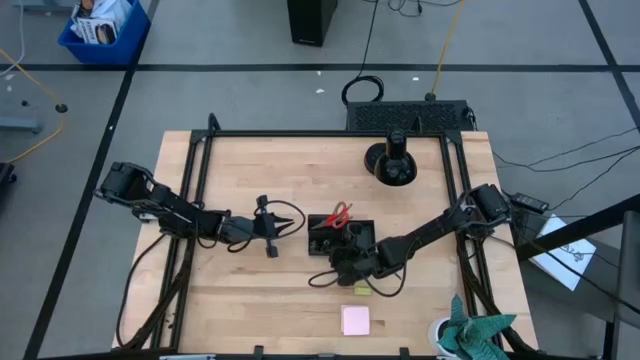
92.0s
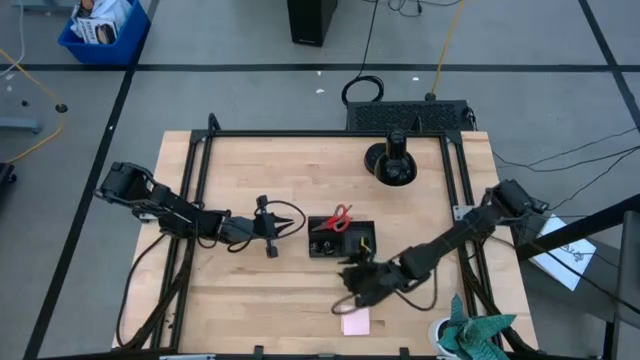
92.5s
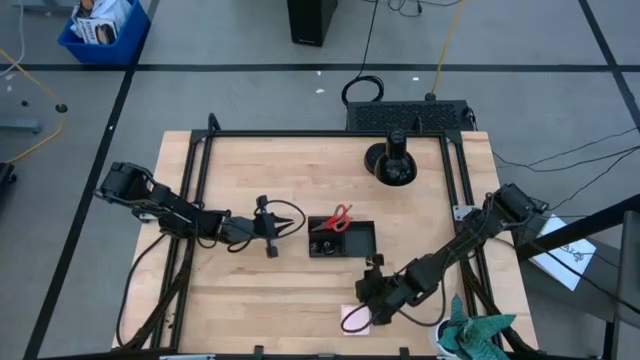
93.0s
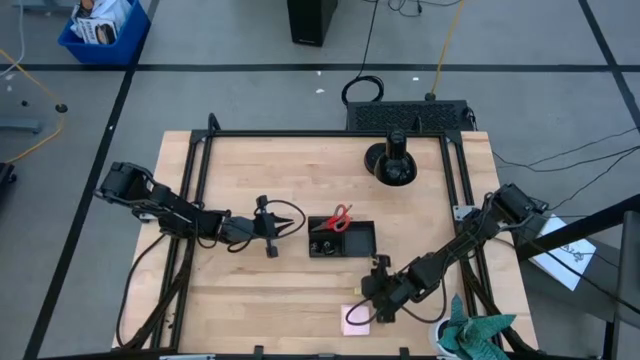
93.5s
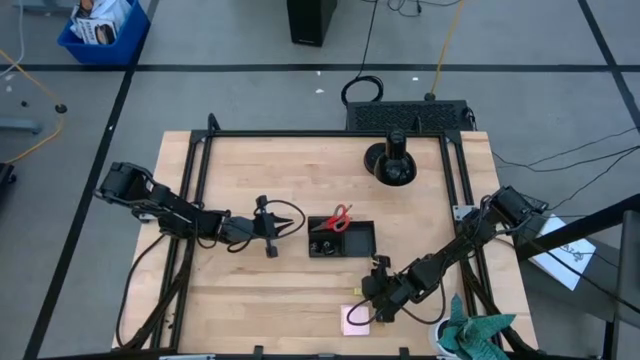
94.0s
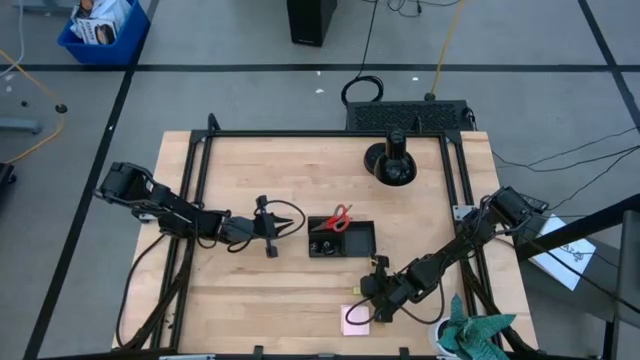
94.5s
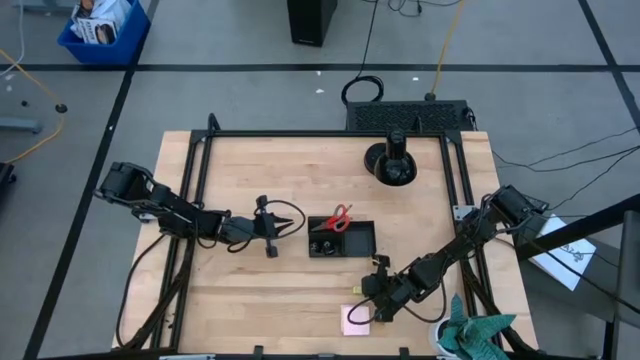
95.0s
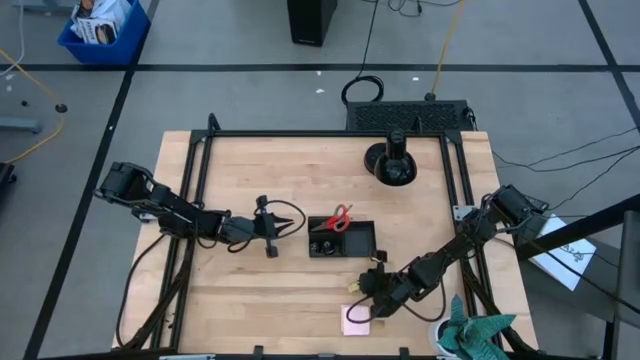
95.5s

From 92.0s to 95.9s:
Task: Pick and place office supplies into organizer
Put the yellow eraser into the black desk organizer

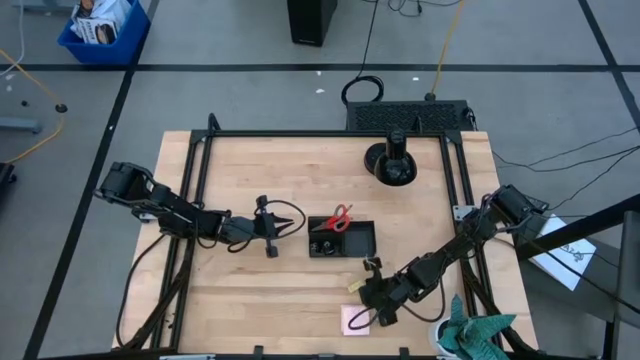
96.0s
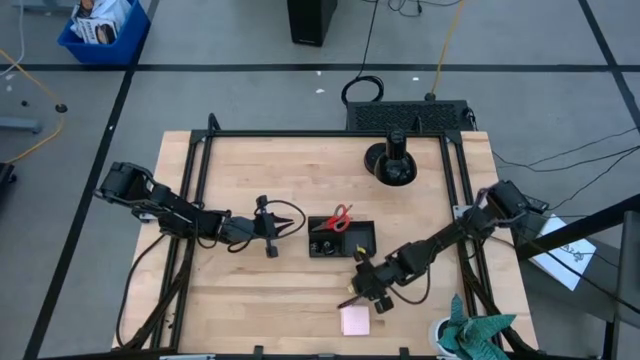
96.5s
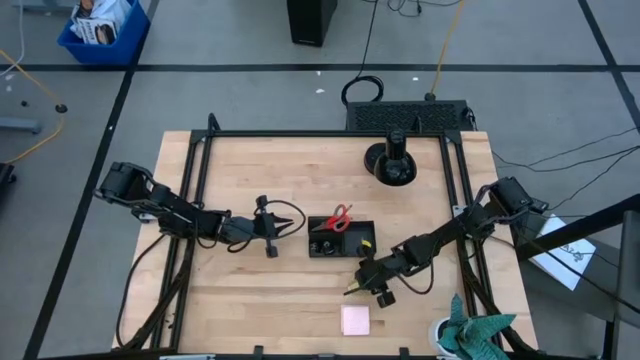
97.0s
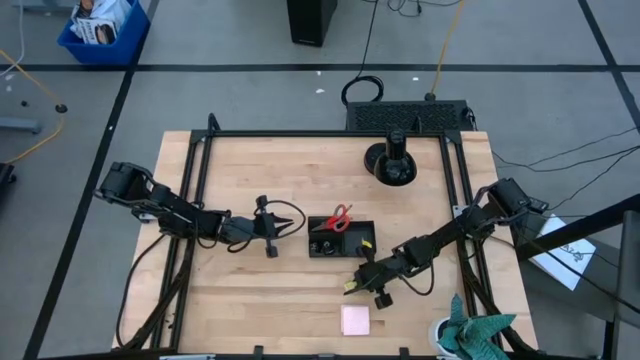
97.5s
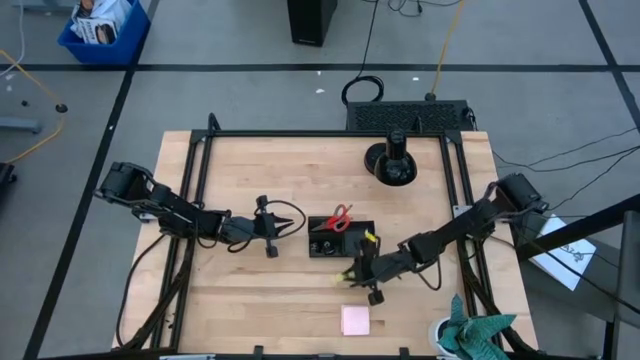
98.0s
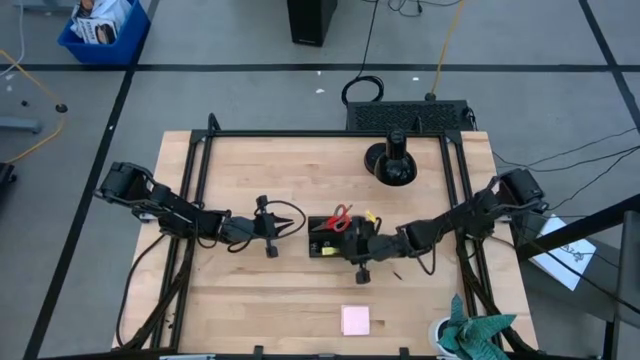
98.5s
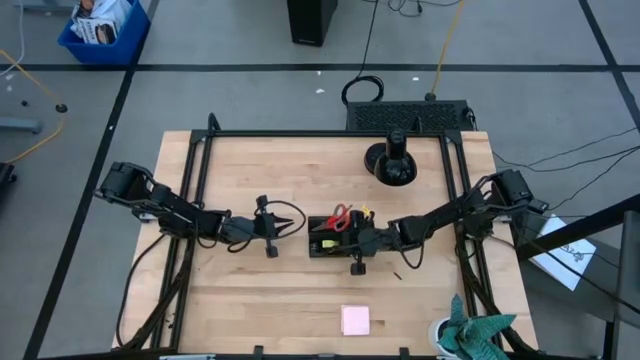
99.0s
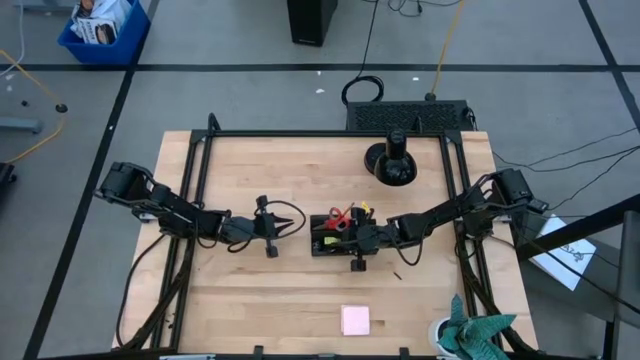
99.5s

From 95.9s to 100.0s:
Put the yellow eraser into the black desk organizer

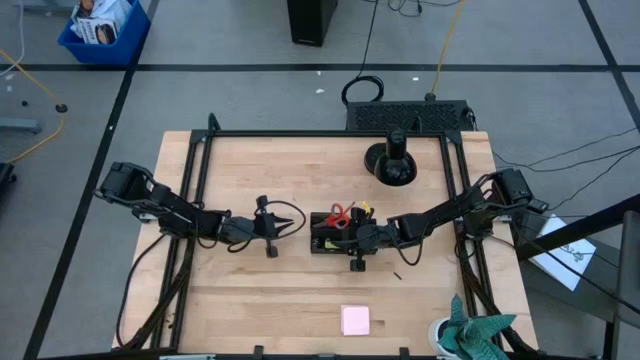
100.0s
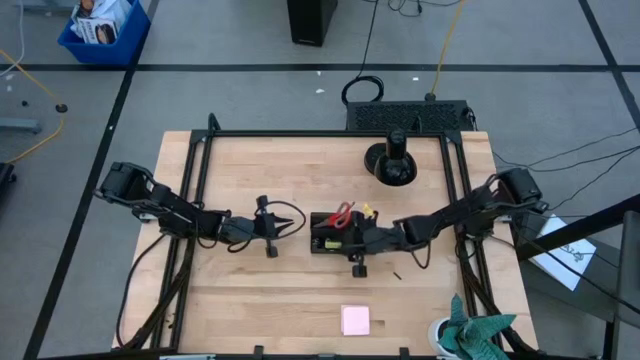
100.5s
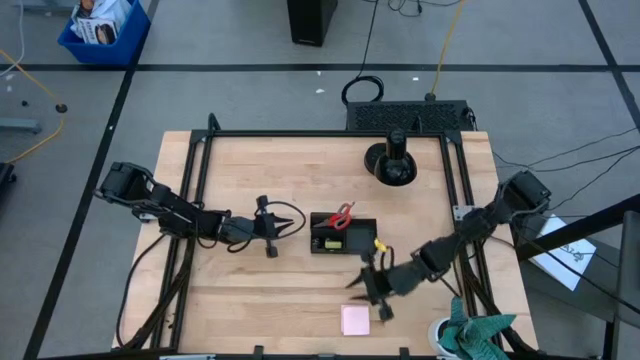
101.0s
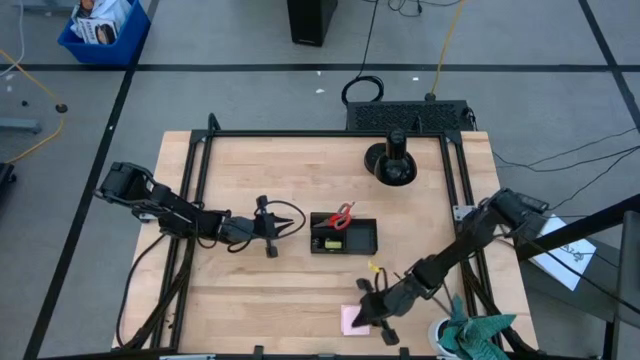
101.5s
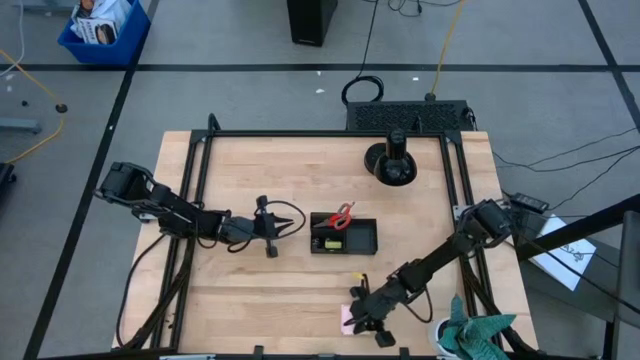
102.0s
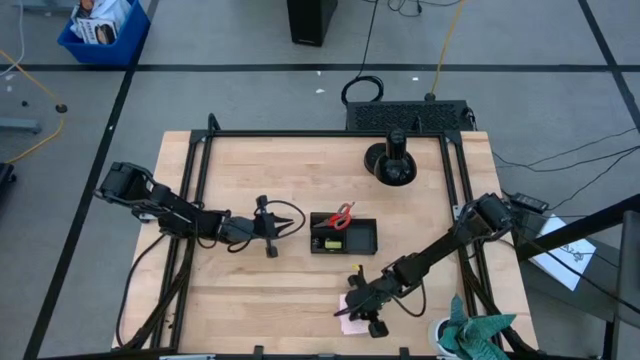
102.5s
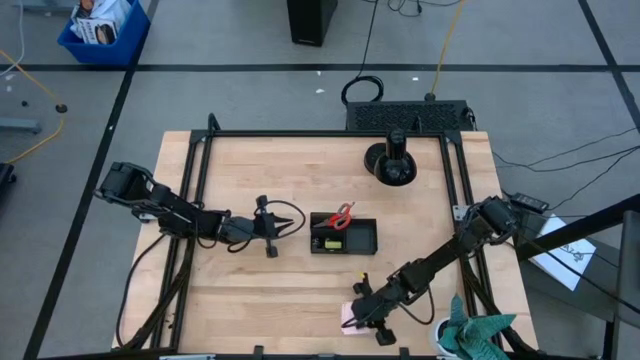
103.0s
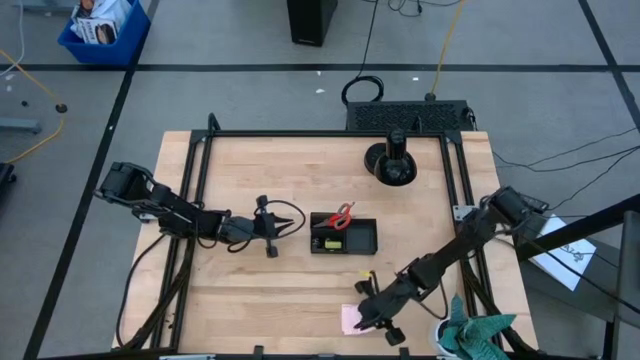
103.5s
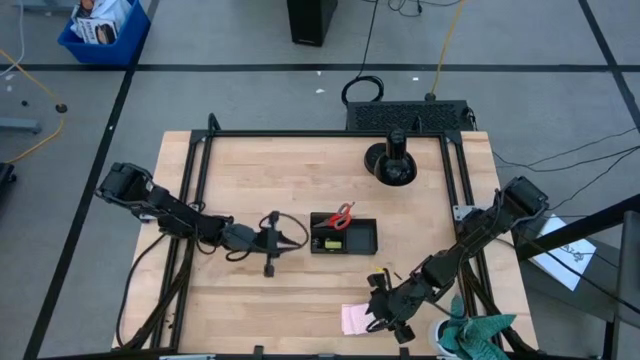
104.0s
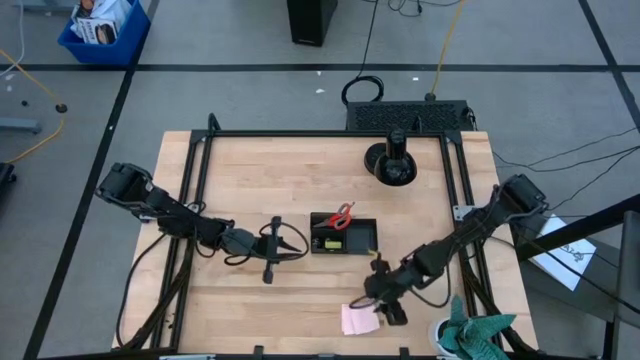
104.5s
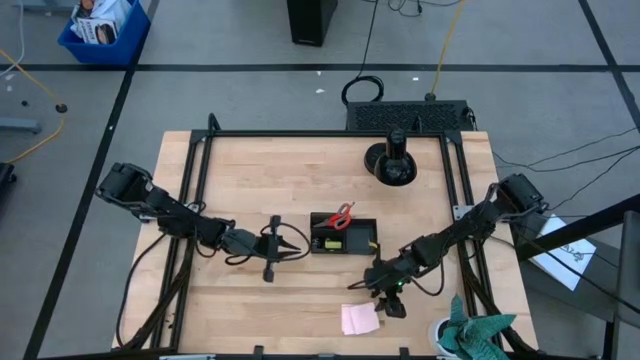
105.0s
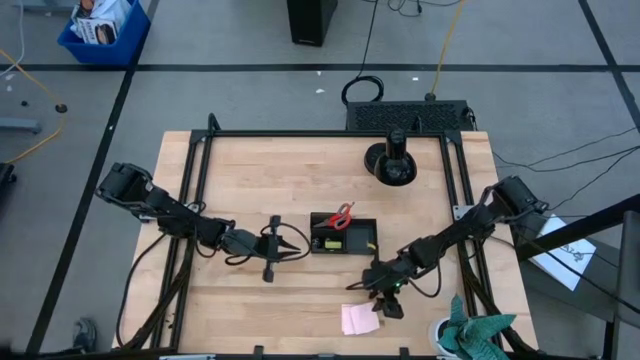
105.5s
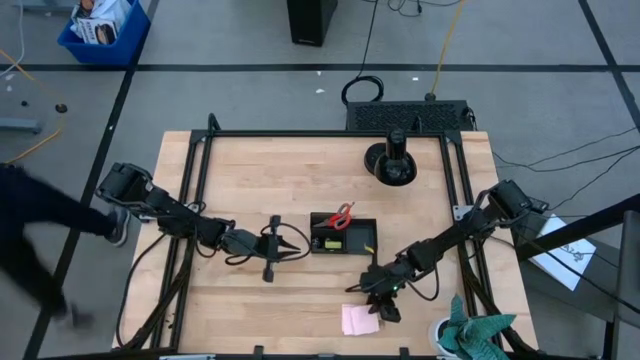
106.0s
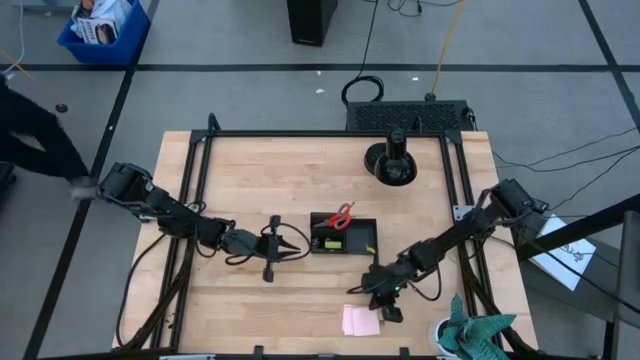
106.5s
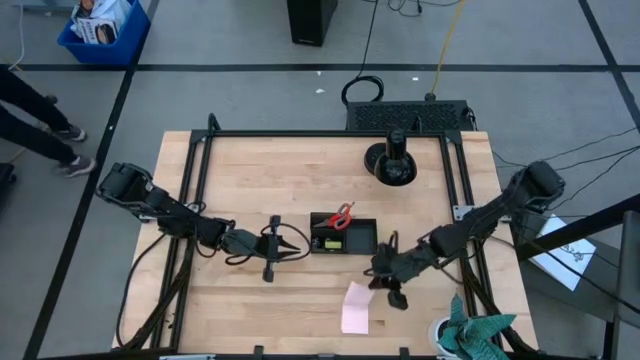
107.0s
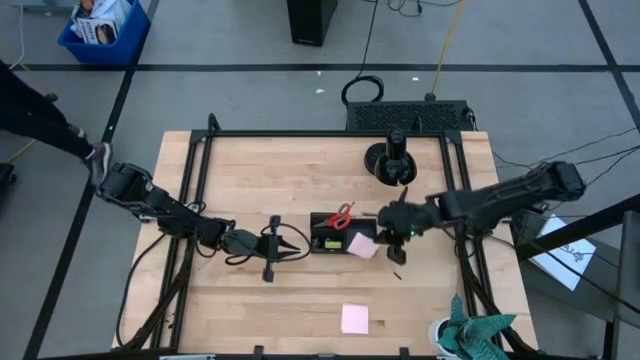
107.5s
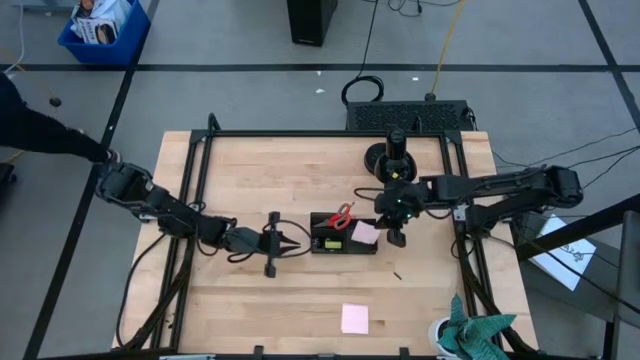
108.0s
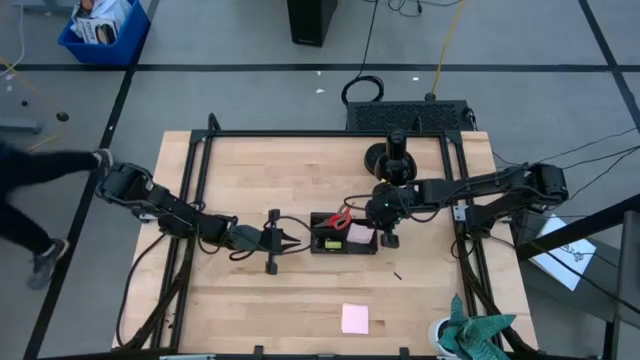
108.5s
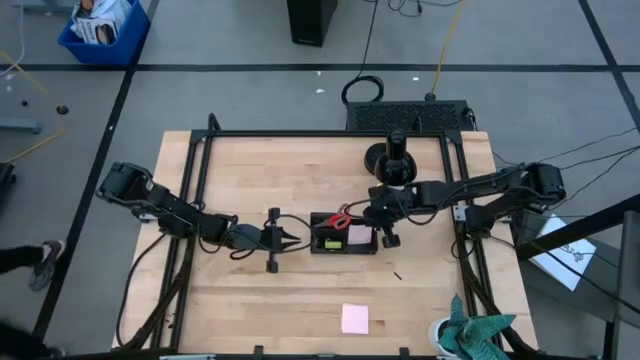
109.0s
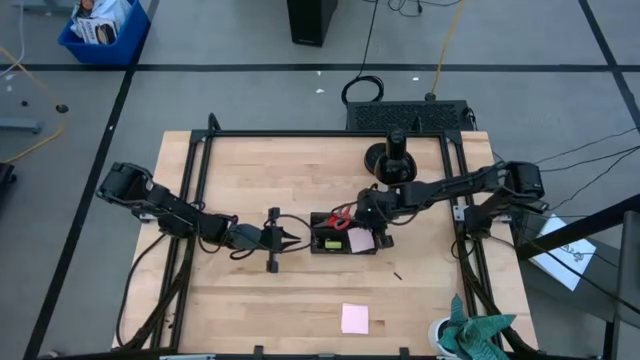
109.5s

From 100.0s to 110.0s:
Put the pink sticky notes into the black desk organizer

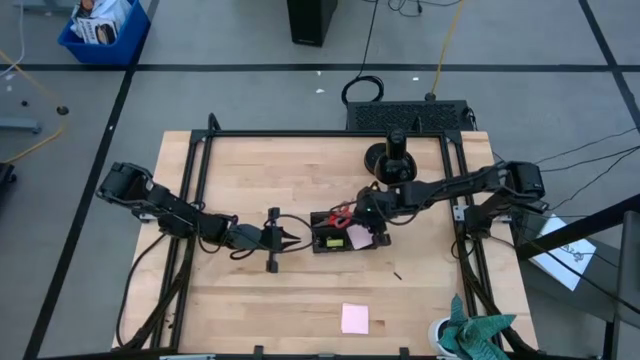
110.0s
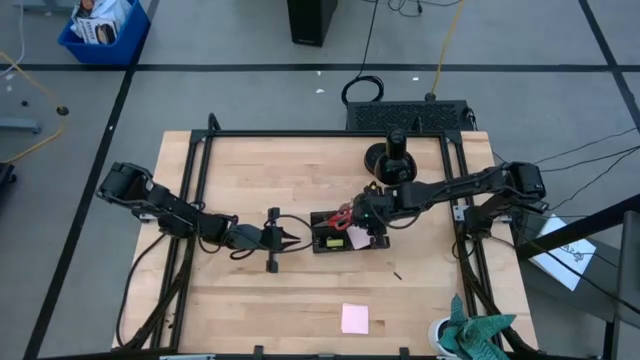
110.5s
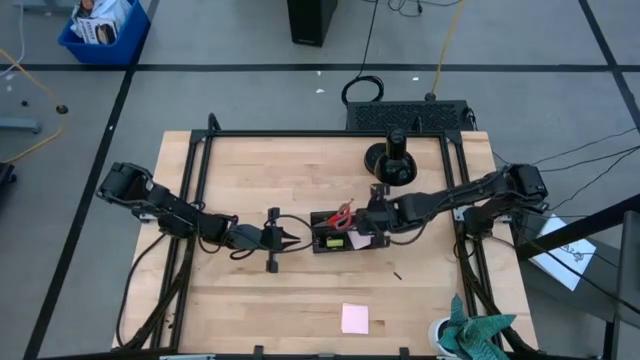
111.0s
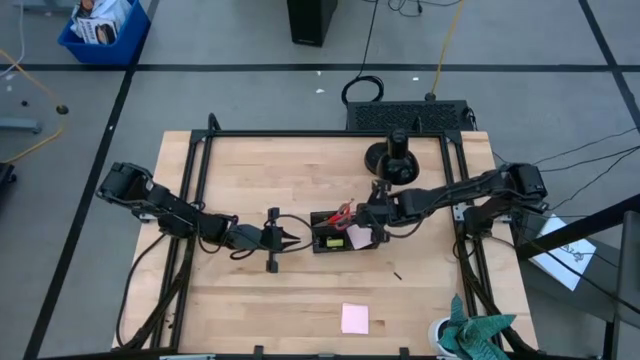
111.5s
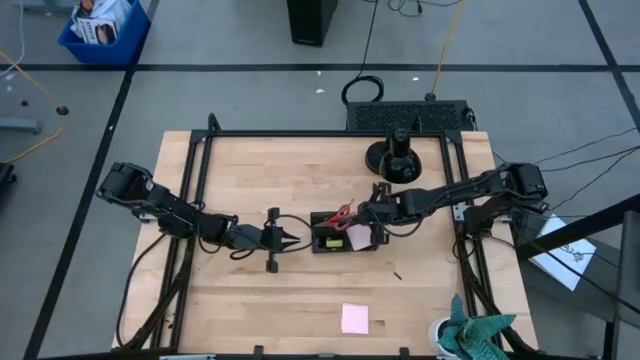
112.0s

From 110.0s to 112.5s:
Adjust the black desk organizer
